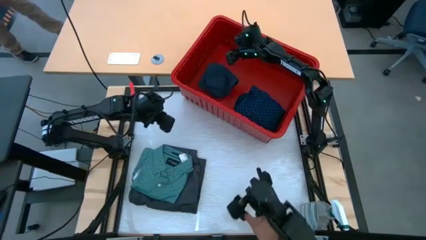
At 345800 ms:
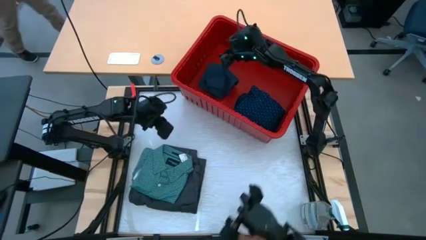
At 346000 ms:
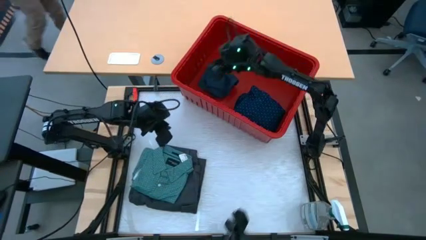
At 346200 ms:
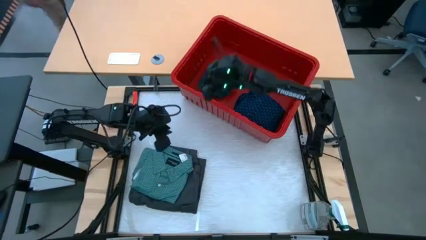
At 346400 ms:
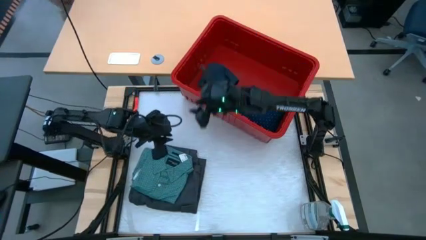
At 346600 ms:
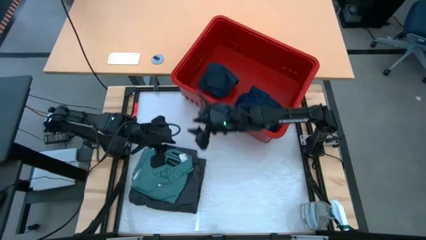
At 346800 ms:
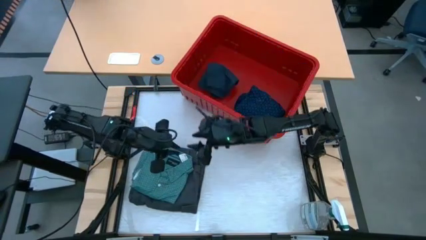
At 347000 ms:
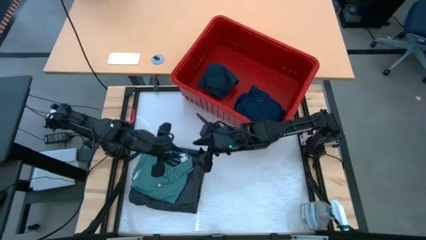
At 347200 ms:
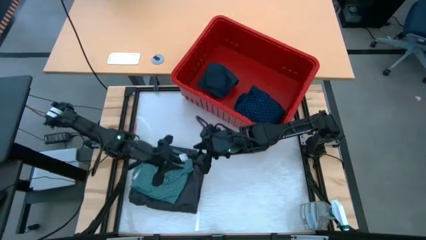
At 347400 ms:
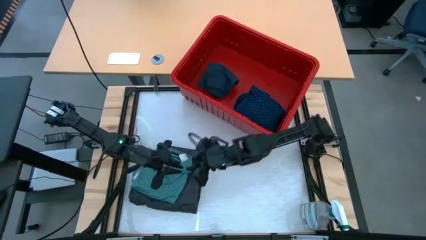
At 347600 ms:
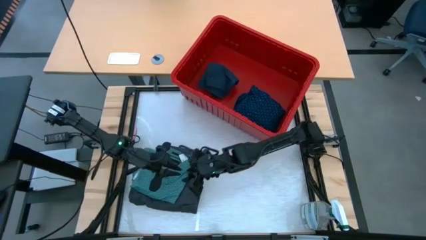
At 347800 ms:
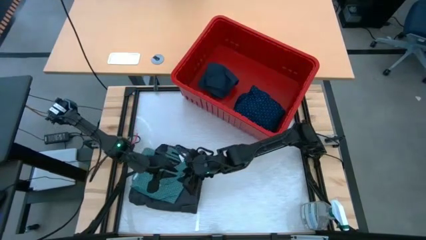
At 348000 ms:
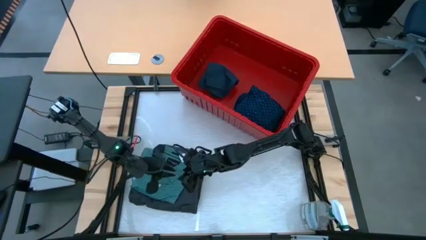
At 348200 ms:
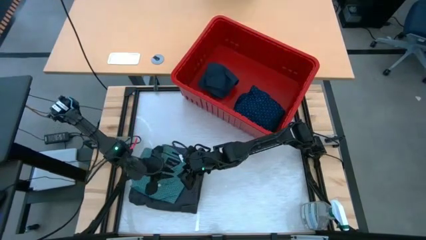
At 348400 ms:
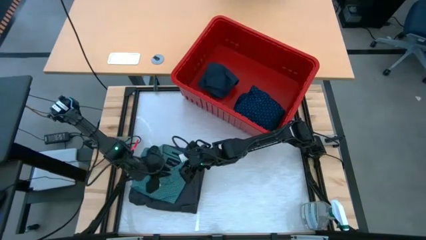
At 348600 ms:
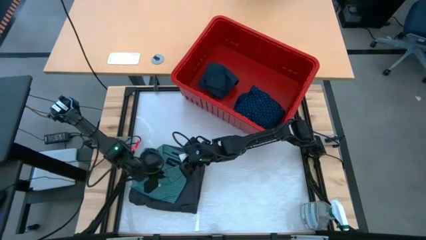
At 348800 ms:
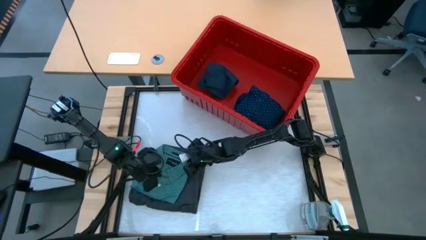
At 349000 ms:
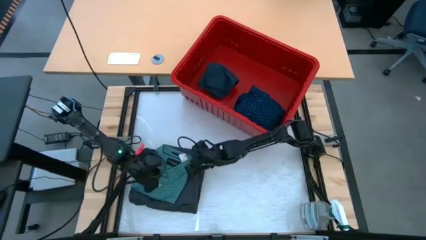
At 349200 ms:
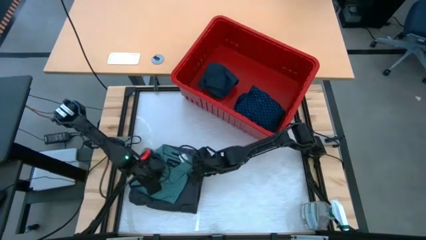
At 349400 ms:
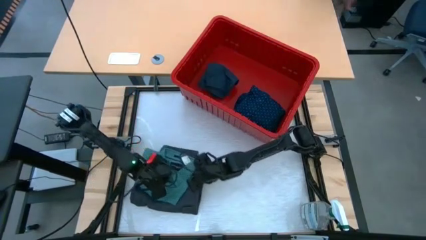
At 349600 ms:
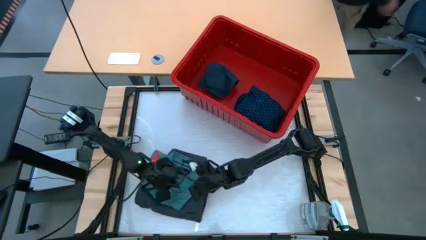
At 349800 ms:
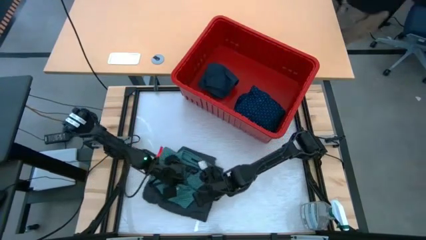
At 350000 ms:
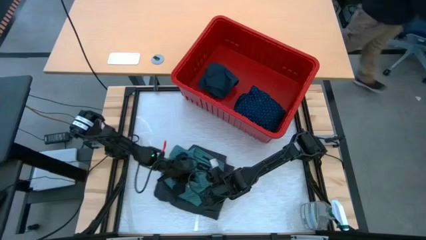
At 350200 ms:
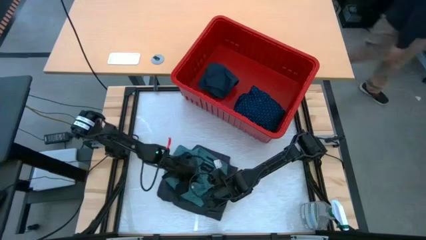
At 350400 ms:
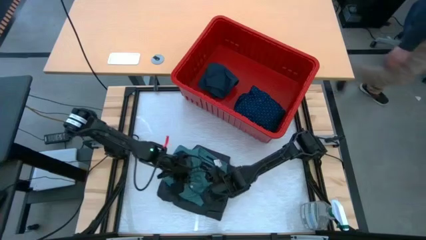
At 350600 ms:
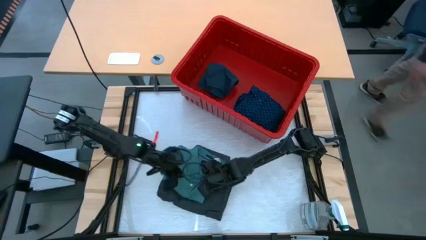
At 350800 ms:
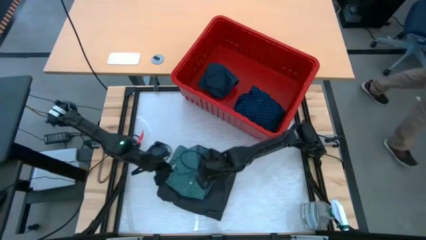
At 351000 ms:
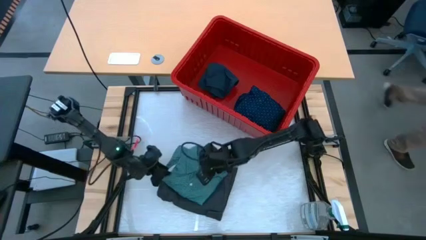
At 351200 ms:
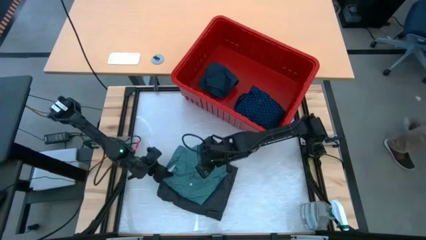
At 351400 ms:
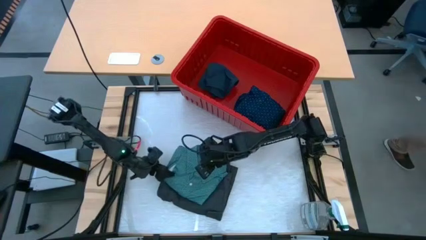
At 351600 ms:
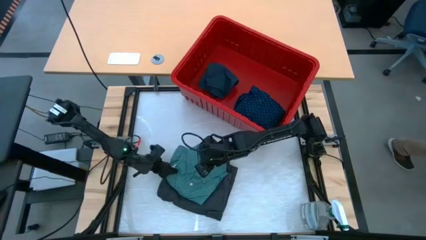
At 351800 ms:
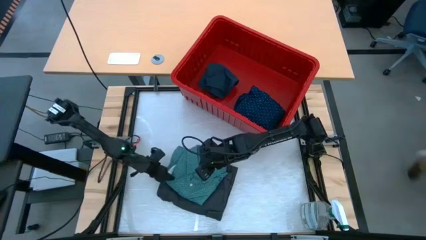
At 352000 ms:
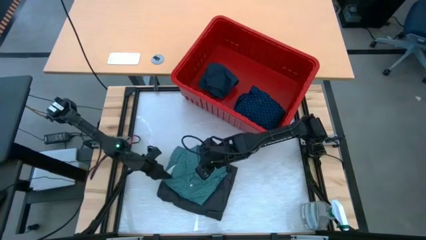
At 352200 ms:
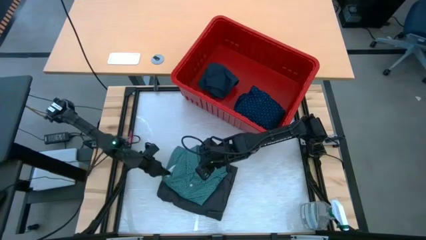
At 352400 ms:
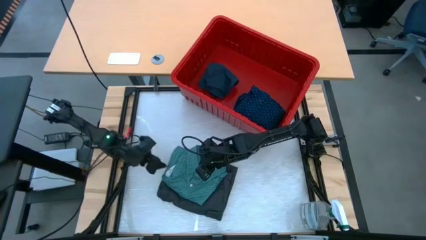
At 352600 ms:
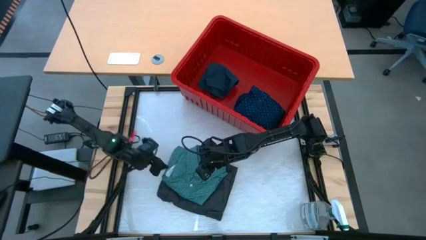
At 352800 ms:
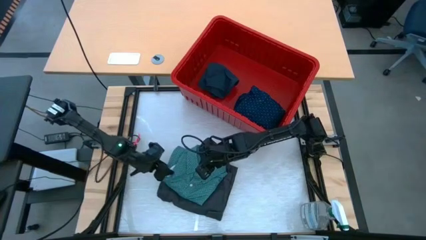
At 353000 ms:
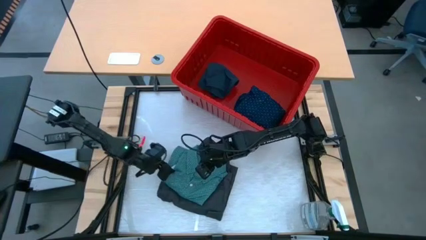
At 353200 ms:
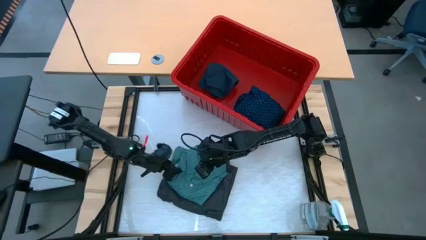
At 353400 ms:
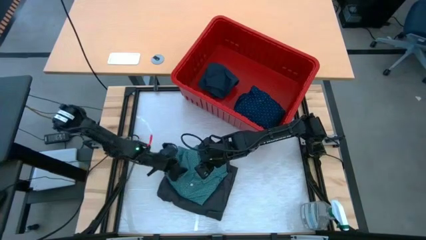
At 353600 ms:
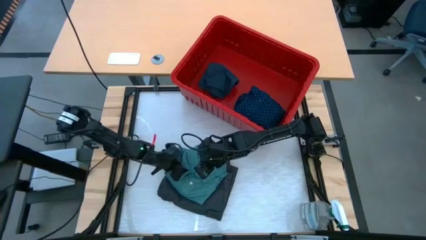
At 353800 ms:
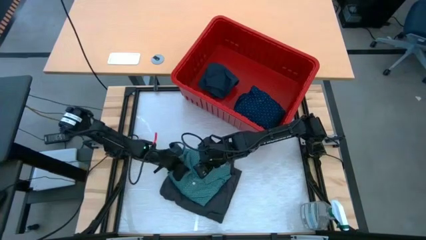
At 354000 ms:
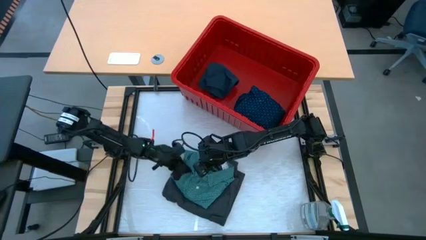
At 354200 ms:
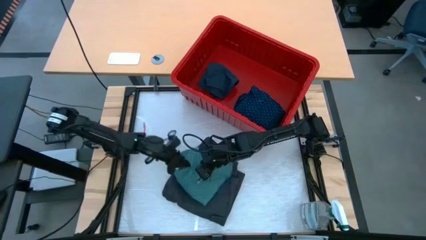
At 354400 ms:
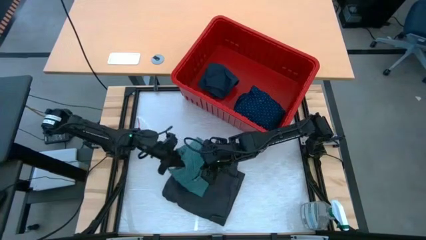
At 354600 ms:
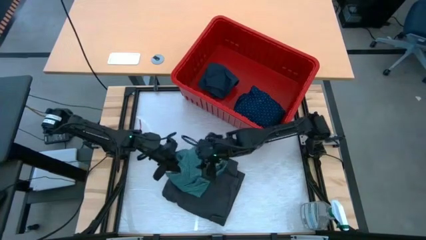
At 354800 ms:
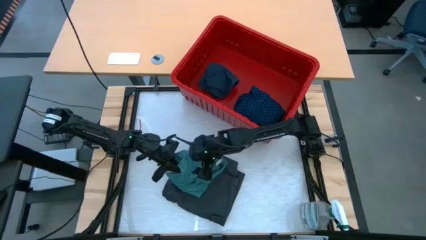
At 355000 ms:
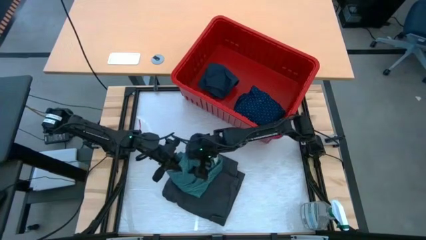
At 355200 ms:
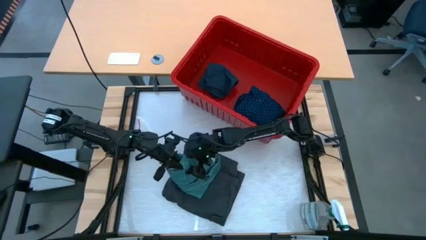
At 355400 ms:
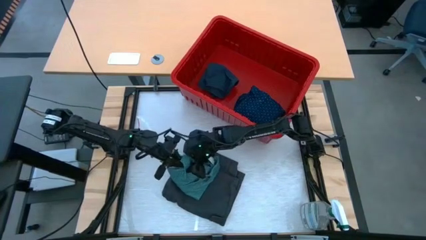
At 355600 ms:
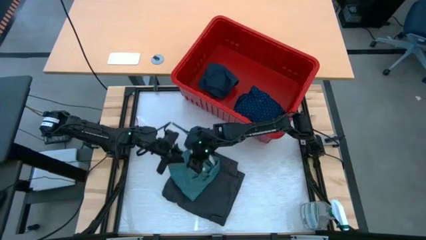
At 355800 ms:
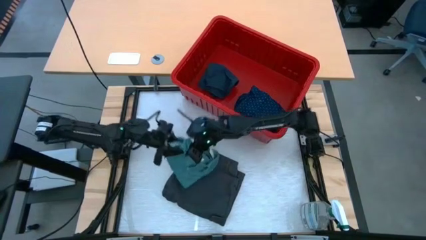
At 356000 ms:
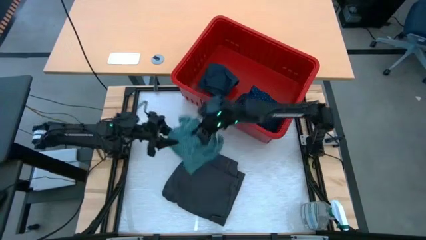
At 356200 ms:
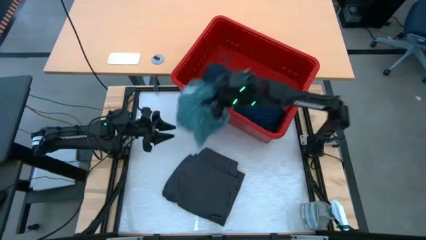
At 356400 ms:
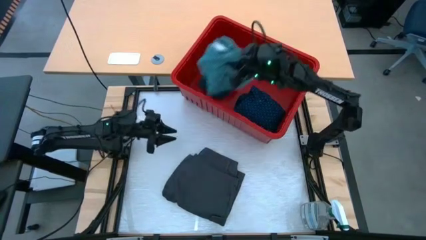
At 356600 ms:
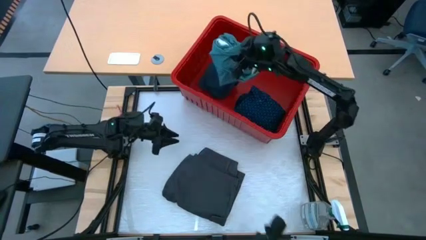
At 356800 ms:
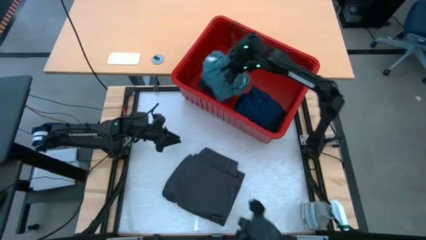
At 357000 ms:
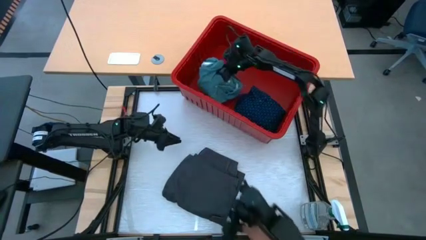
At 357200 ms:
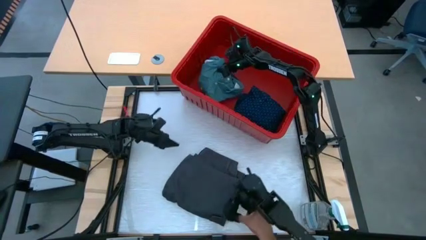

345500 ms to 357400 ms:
Task: Fold laundry
Stack the dark green polo on top of the dark blue shorts

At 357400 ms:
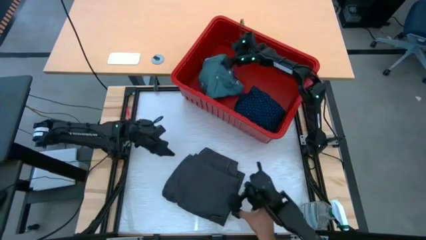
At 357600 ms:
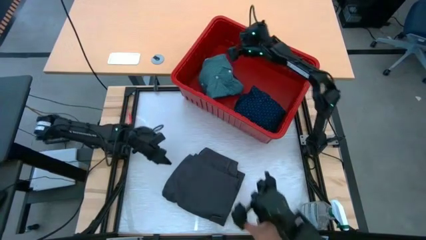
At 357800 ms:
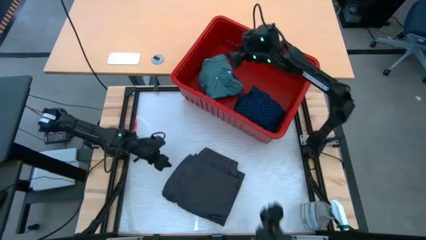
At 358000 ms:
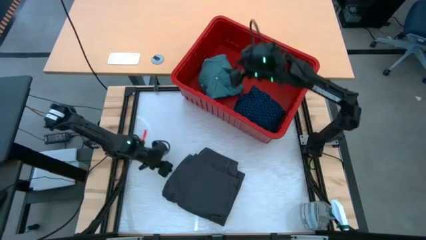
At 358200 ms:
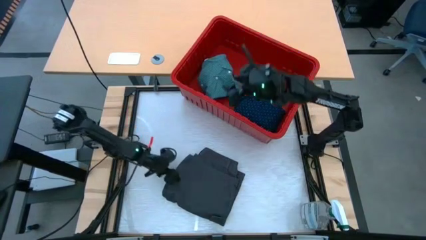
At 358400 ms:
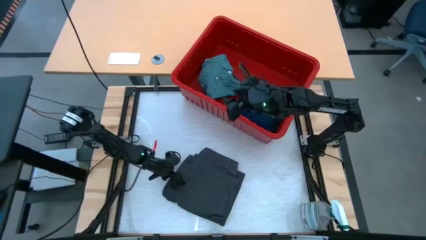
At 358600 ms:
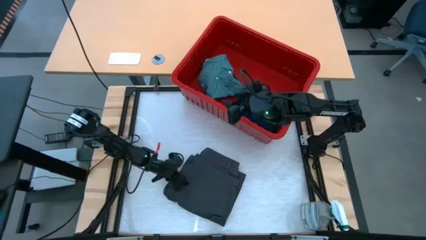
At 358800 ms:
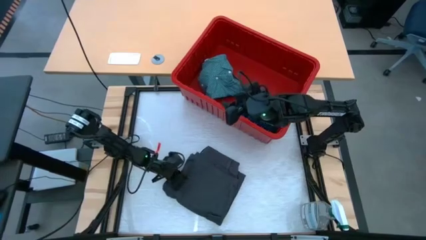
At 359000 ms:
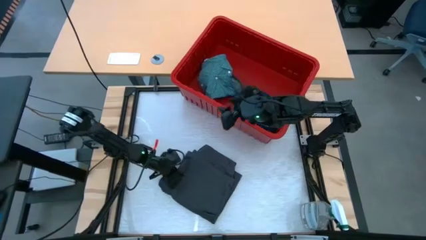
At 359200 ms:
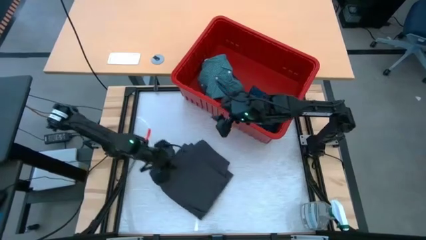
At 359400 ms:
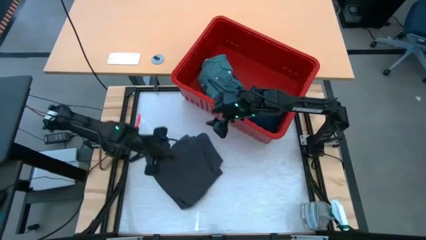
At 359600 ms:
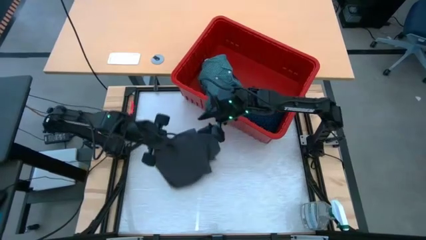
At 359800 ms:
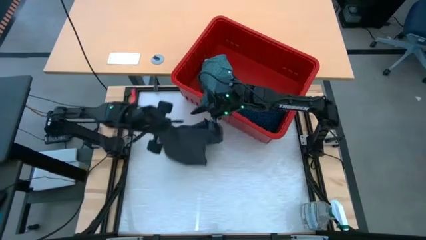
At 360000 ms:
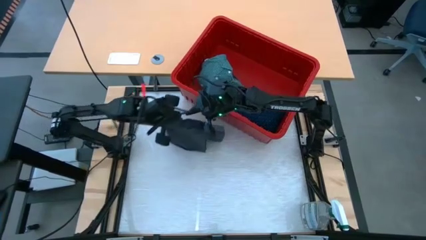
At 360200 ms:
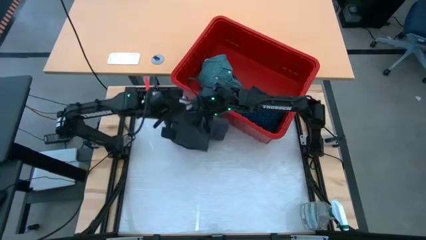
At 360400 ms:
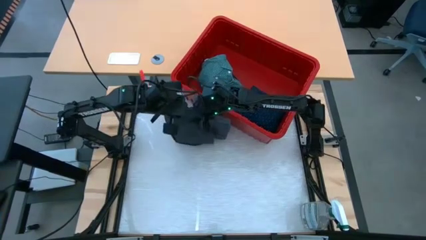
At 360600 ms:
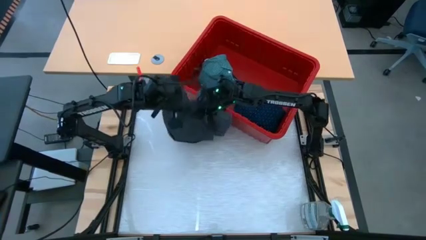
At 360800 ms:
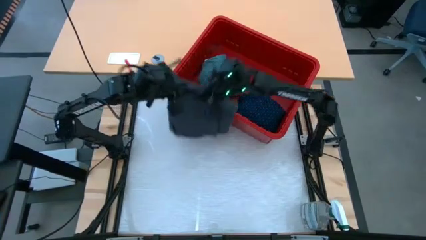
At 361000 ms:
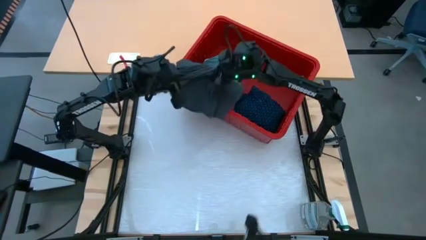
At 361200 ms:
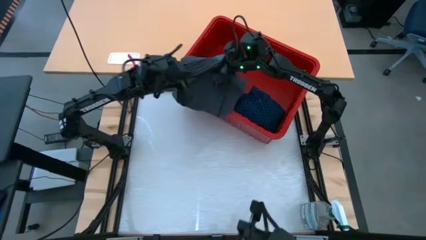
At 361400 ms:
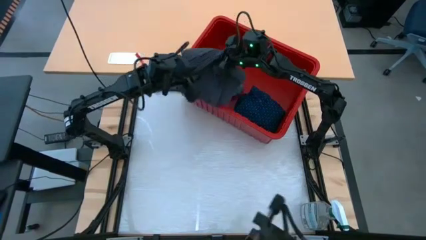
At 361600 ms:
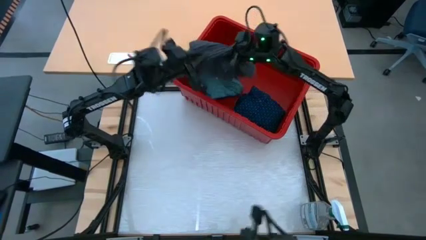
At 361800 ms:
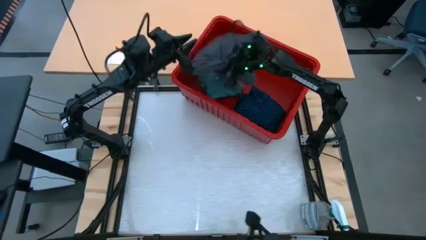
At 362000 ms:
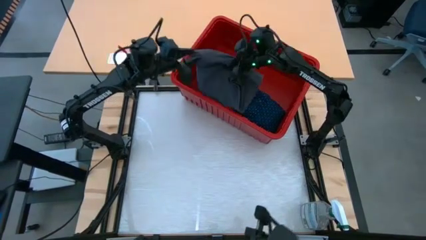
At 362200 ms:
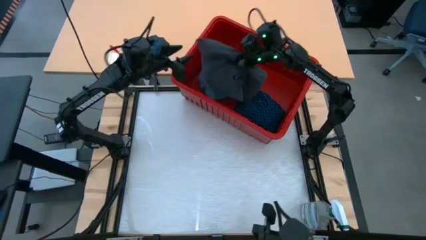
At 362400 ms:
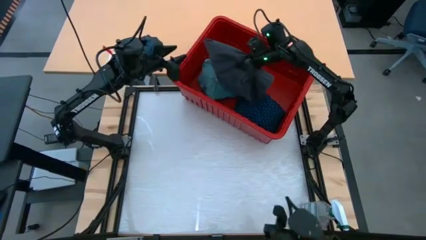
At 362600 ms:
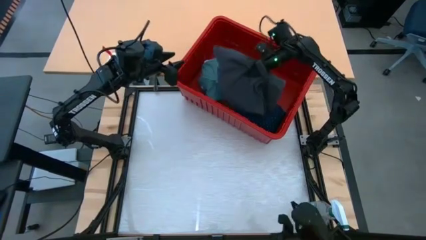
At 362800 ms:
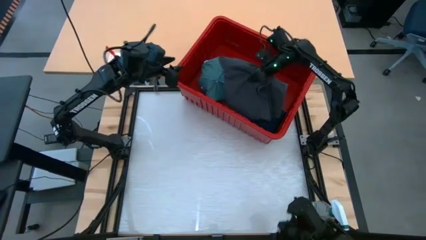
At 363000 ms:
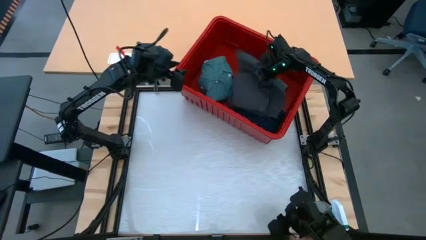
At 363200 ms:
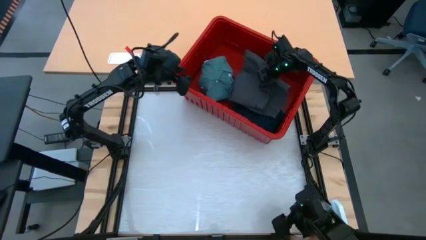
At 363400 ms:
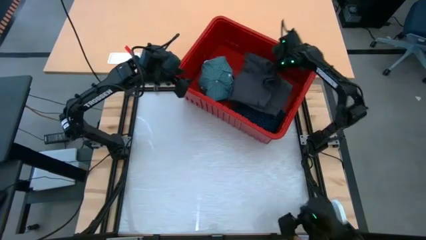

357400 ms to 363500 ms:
Put the black shorts into the red bin
